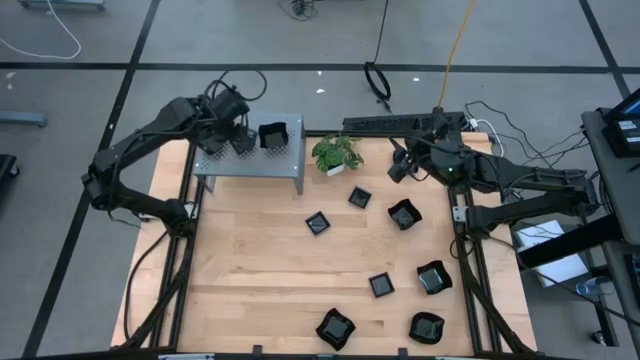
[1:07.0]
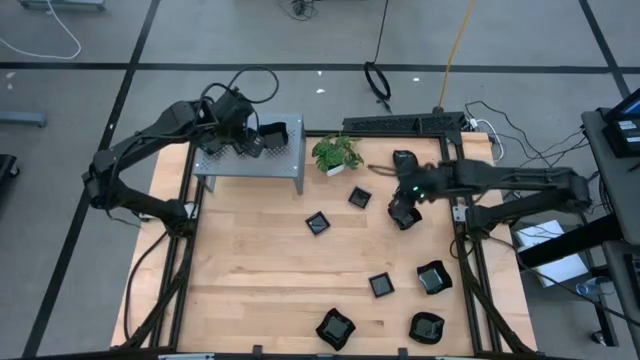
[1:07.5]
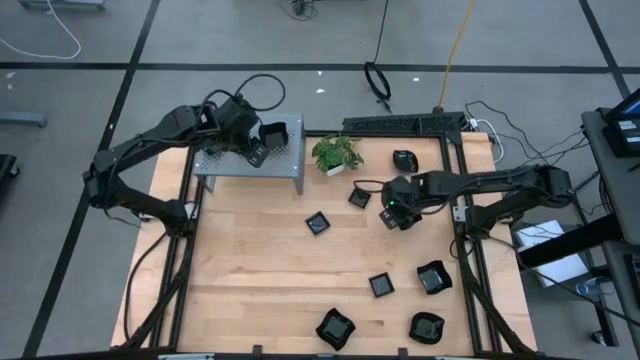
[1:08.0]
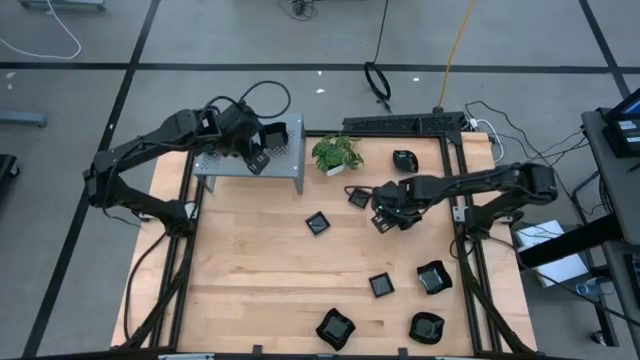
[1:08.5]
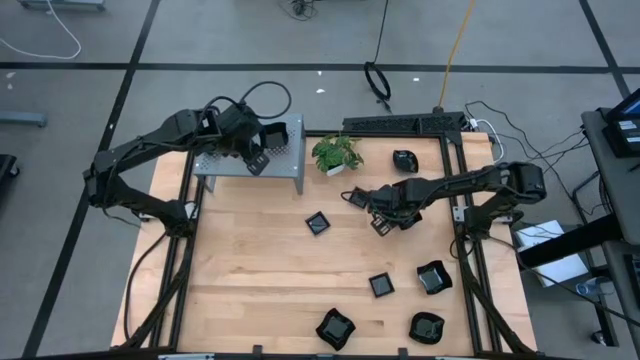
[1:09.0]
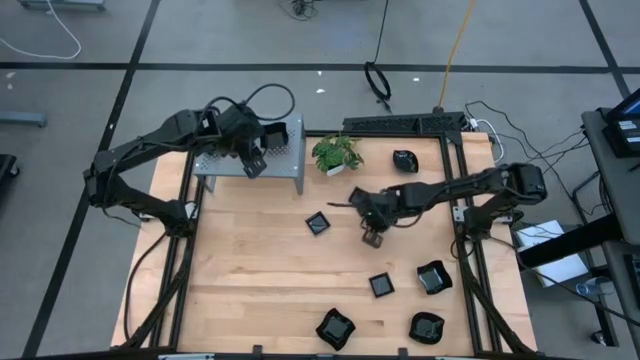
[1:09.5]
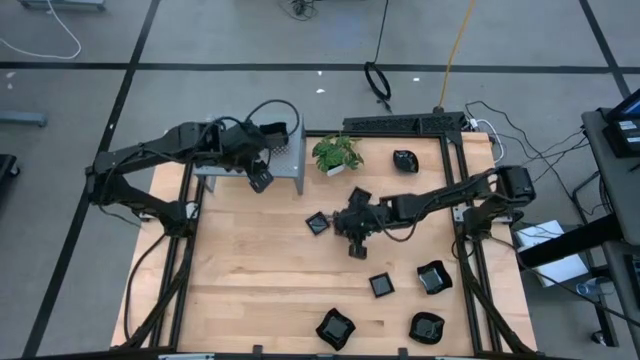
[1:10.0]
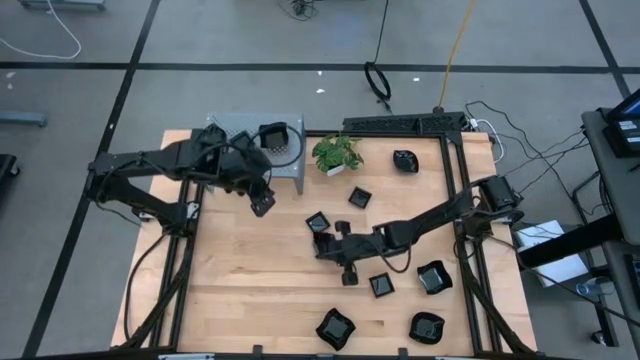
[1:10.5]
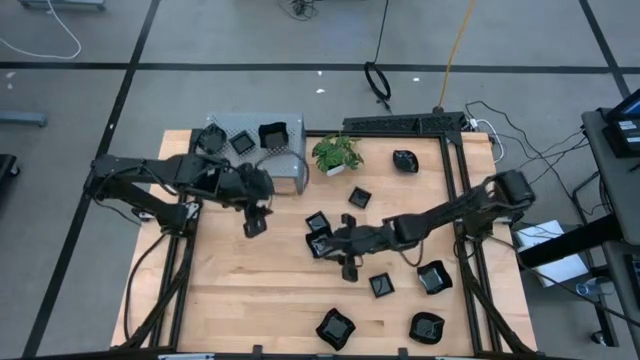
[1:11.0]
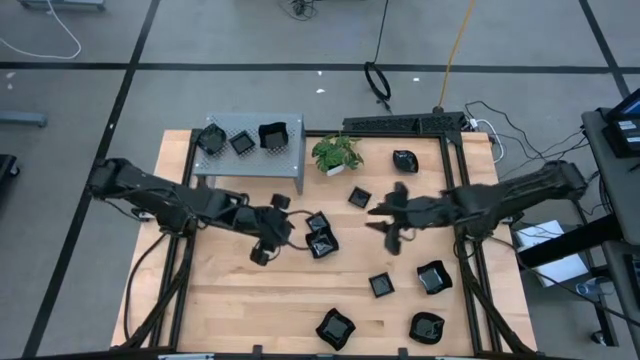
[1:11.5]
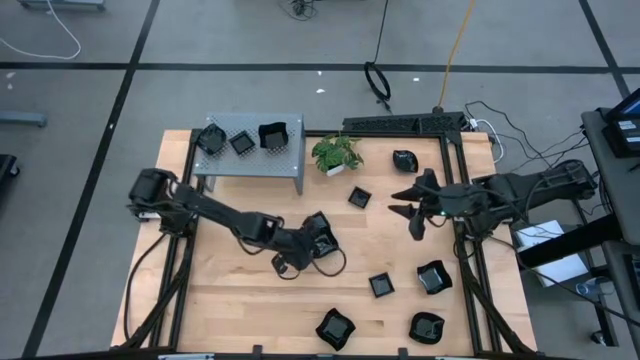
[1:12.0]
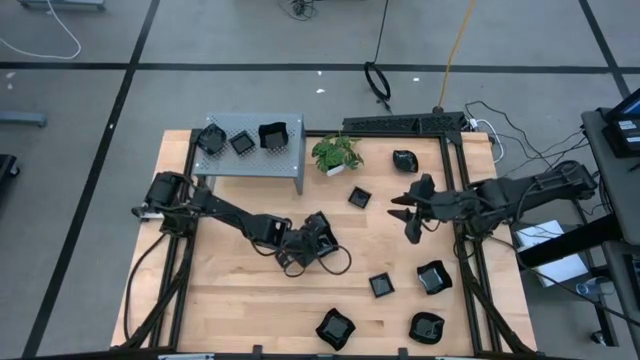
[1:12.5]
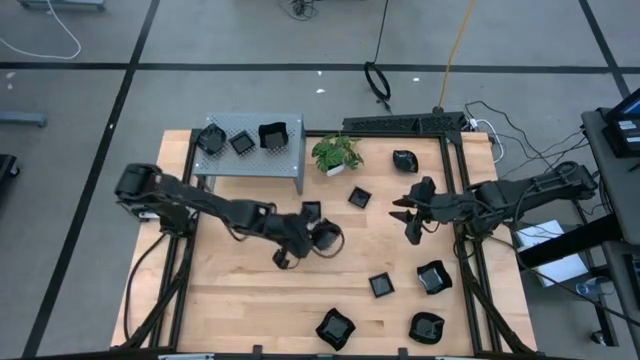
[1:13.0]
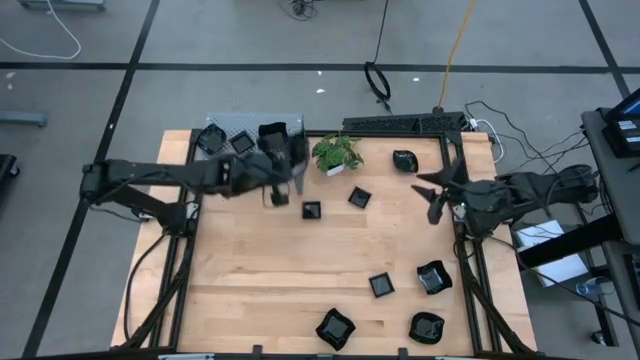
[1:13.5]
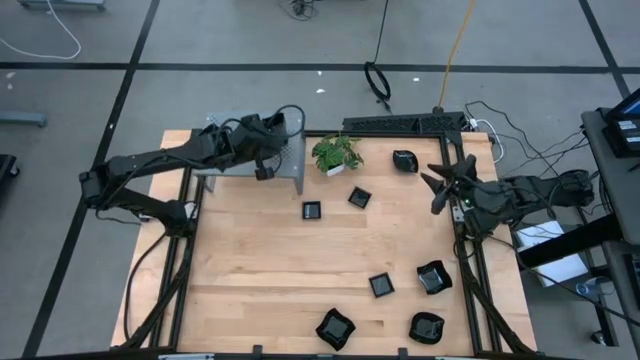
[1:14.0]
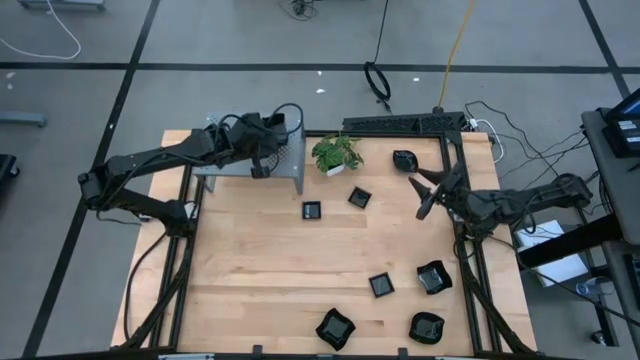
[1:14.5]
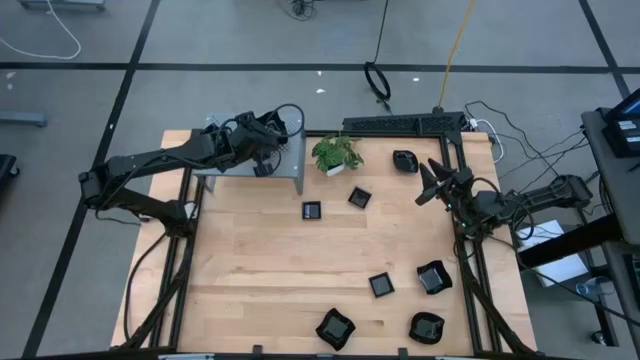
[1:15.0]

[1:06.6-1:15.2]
Task: Pick & Place Mini shaped plates
Stack the black distorted square plate on top of the other black distorted square plate on the shelf

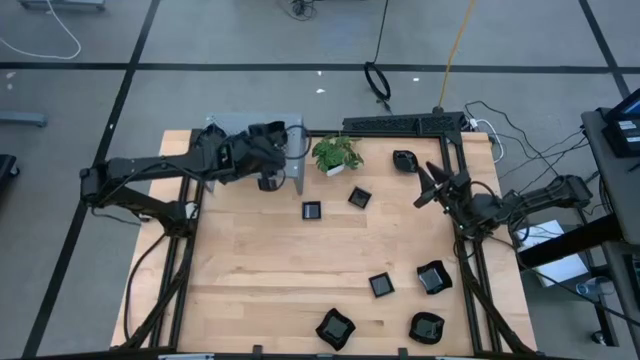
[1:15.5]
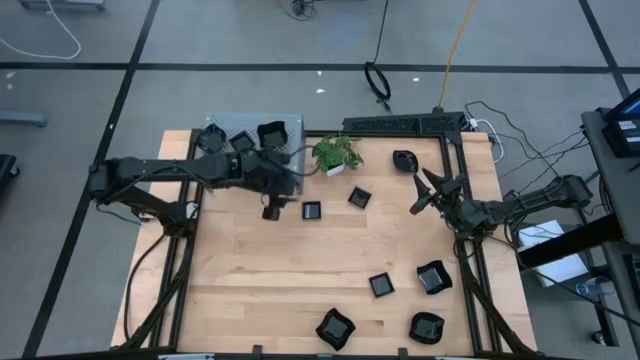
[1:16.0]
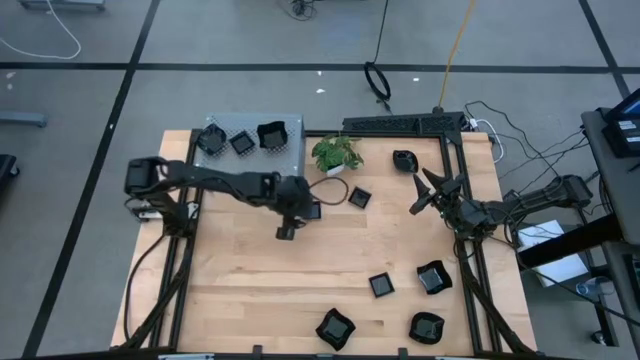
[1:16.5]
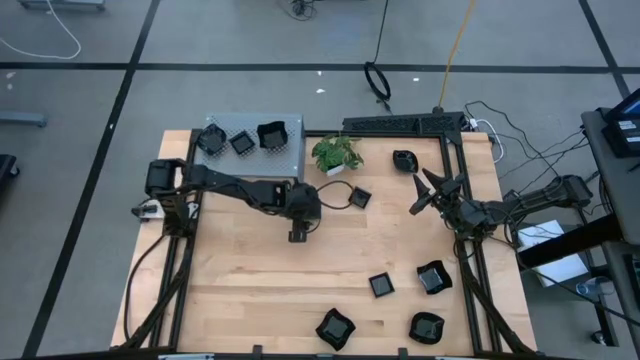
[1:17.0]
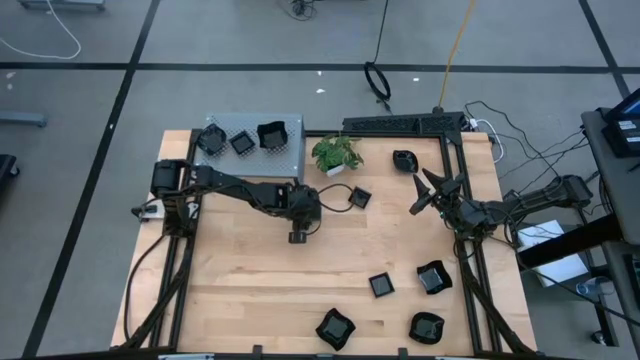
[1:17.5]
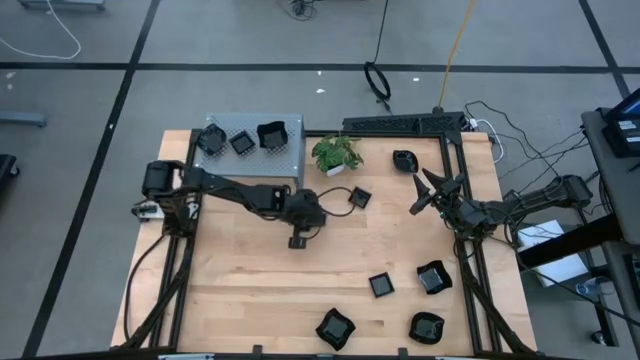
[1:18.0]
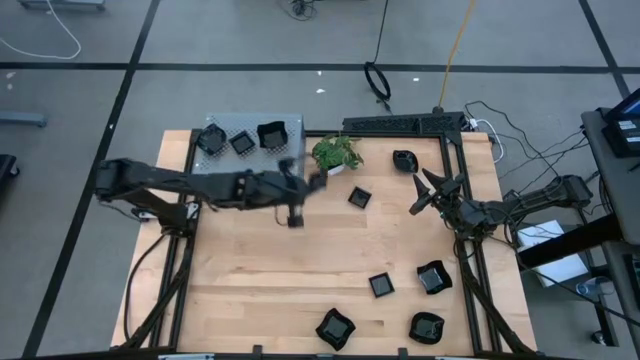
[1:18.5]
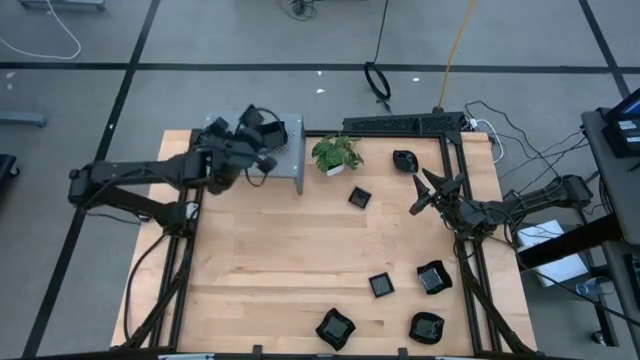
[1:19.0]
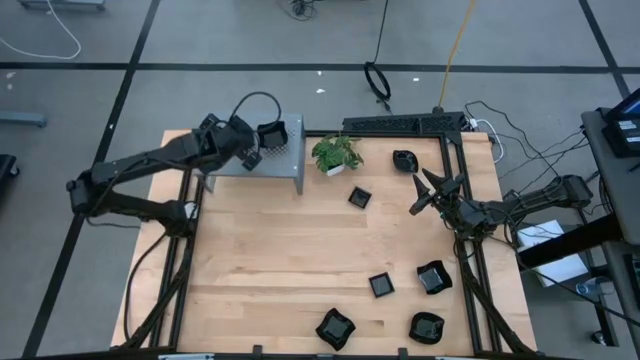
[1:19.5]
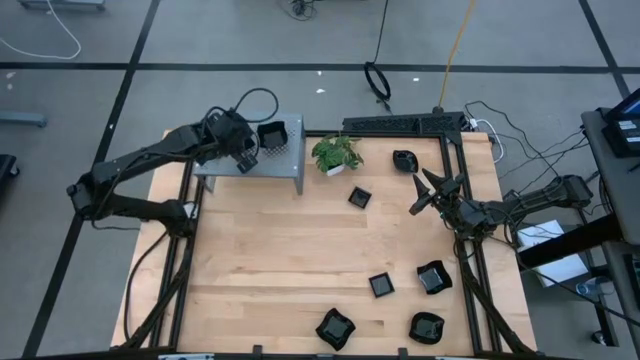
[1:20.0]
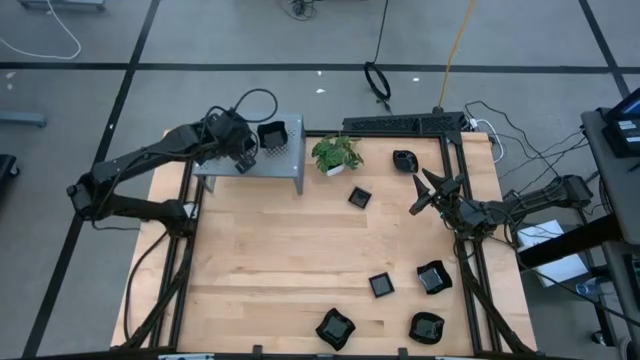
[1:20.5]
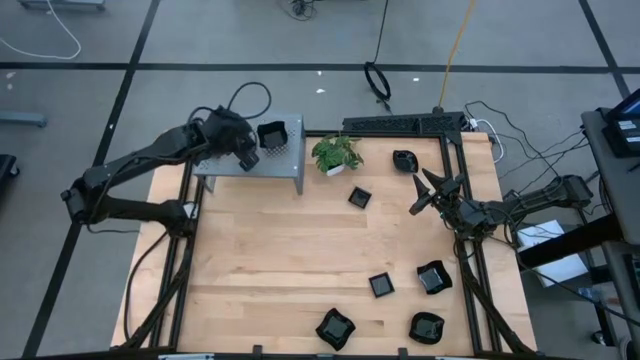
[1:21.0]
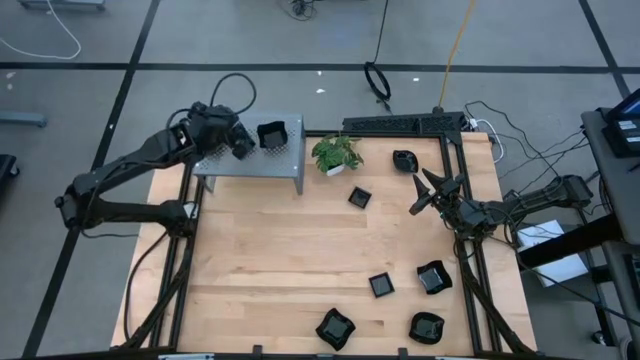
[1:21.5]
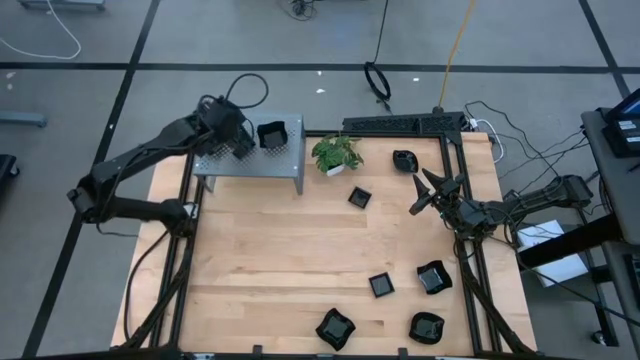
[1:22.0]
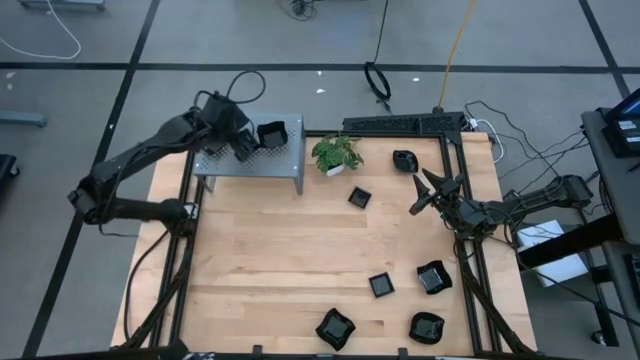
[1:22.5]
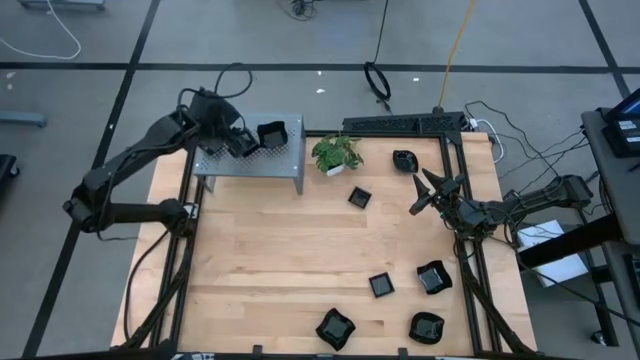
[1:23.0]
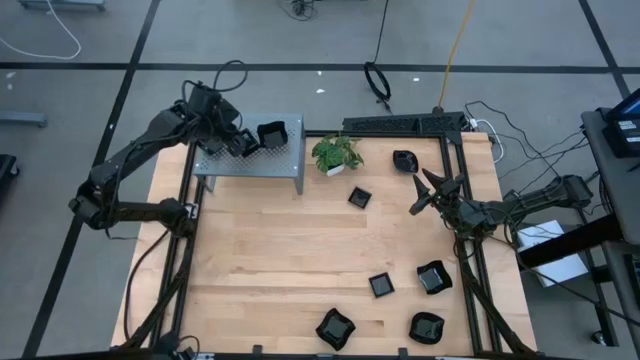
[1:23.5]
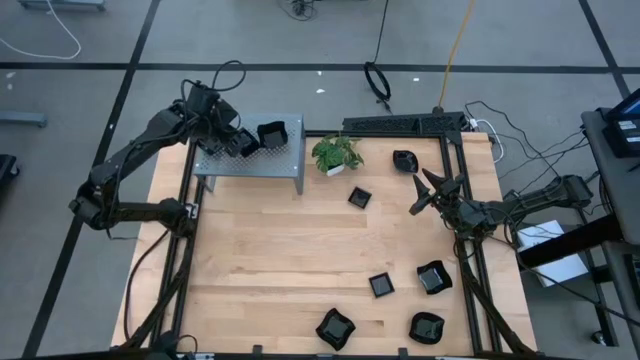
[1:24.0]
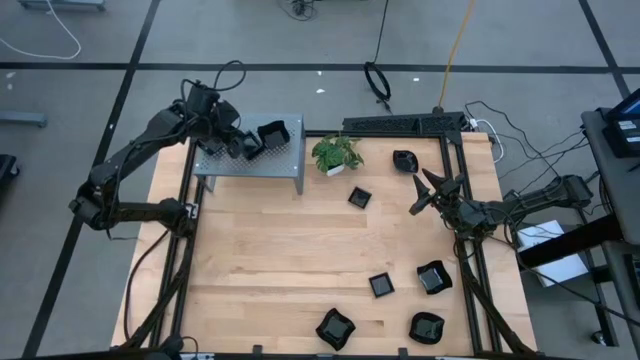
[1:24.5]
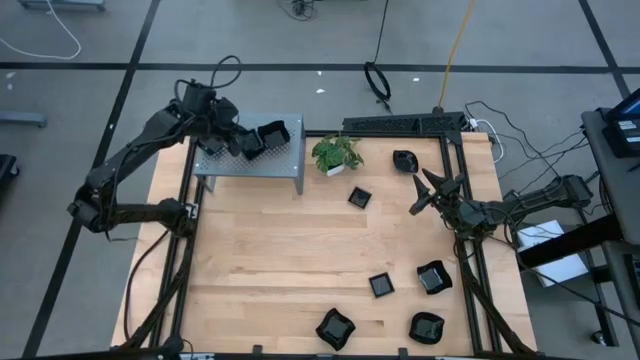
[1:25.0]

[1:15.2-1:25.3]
Stack the black square plate on top of the other black square plates on the shelf

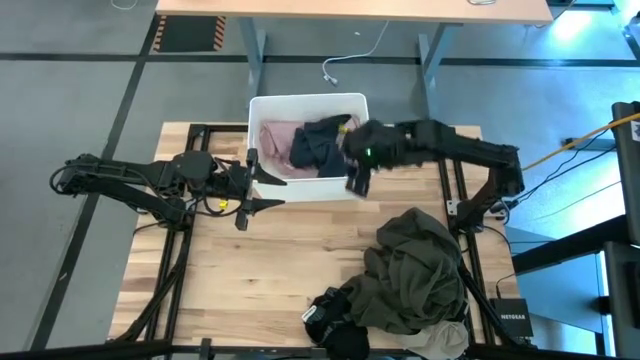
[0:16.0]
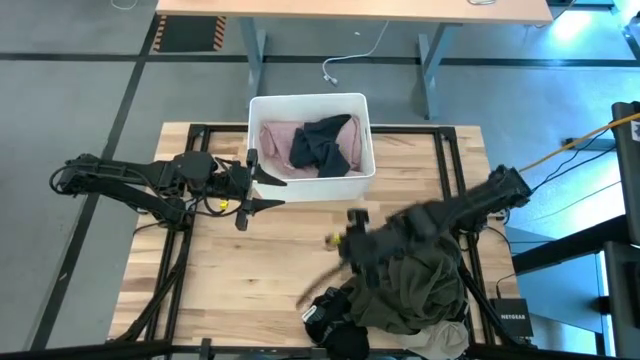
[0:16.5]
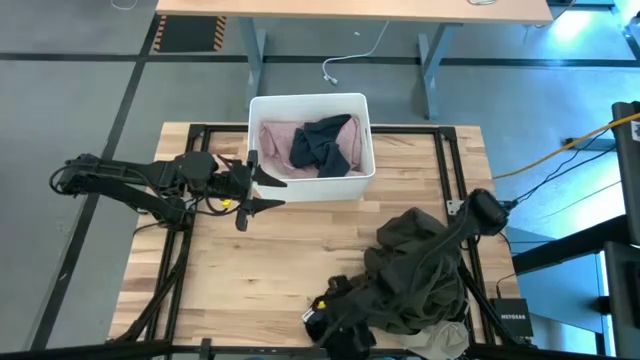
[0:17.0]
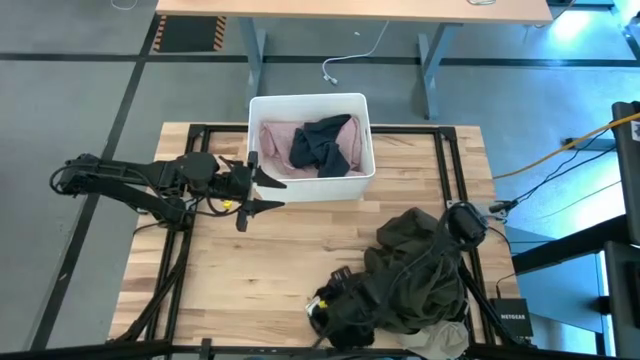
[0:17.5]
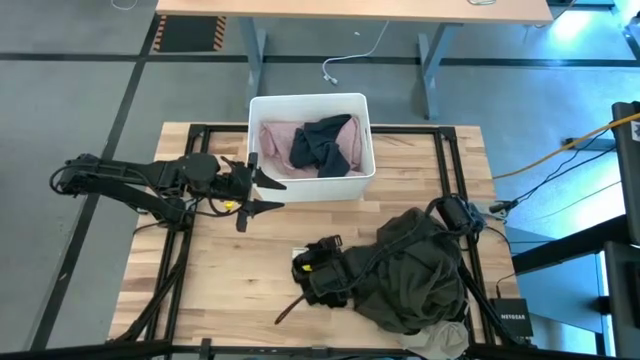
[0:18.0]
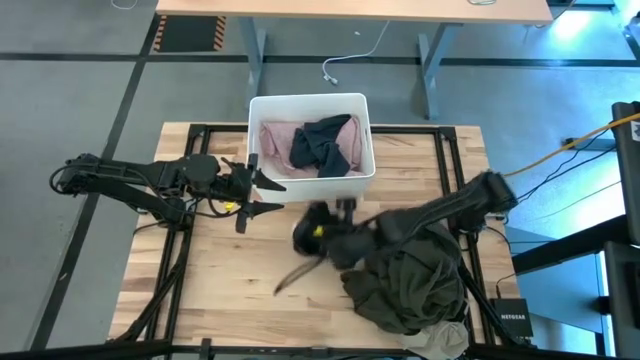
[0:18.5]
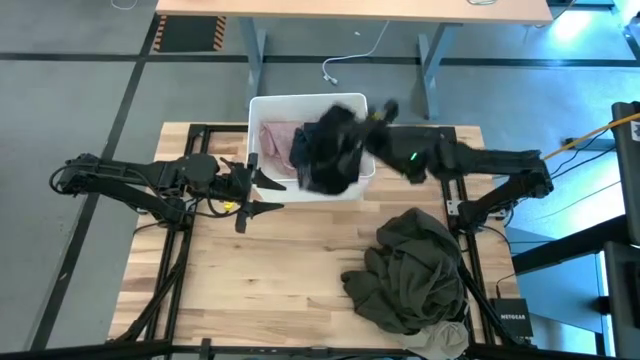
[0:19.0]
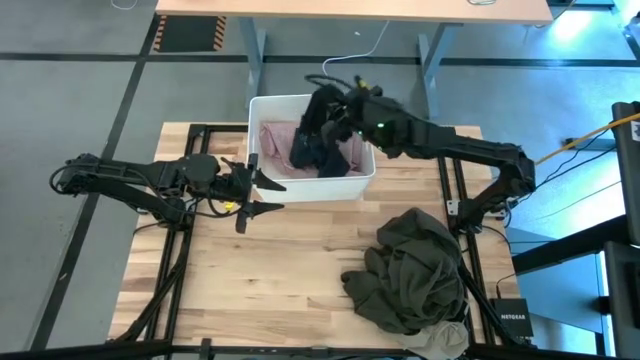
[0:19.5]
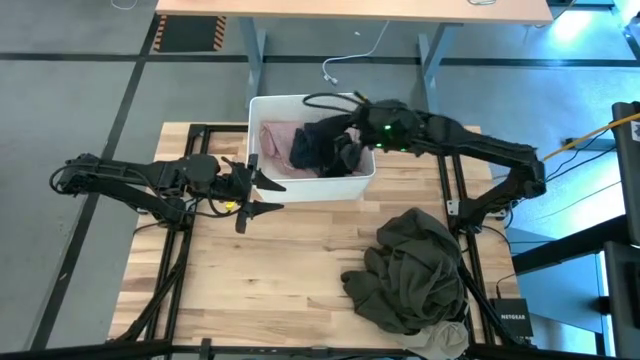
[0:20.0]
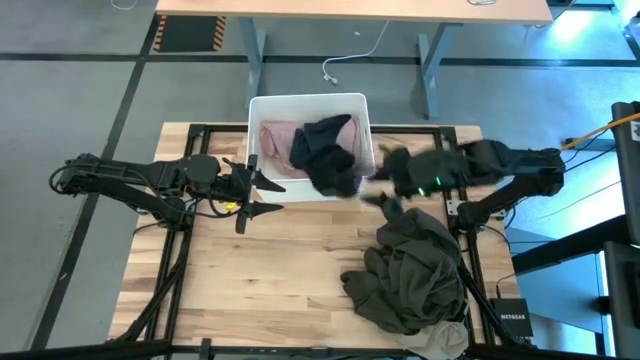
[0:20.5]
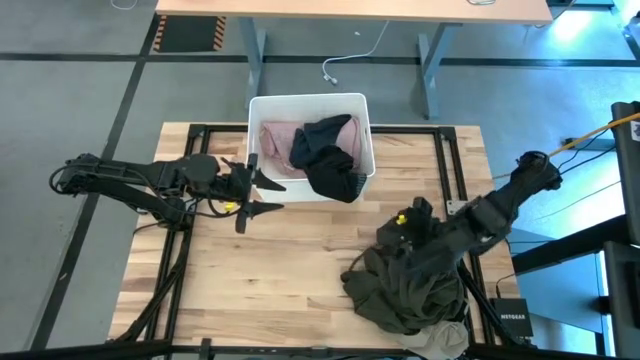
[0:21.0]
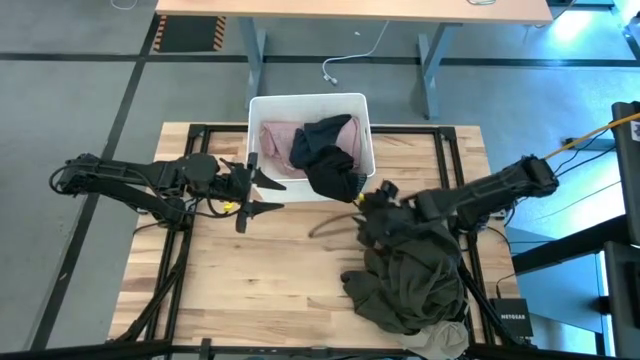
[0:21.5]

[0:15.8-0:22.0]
Task: Sort clothes
Put the black boxer into the white laundry bin
